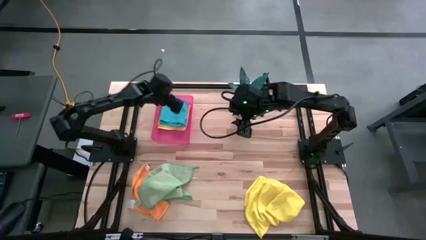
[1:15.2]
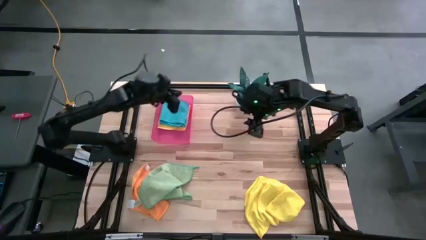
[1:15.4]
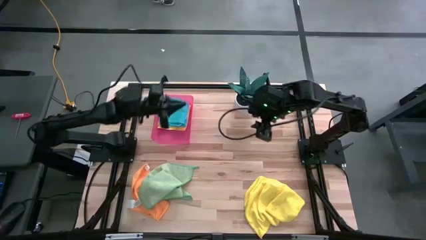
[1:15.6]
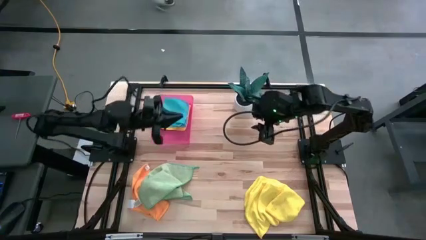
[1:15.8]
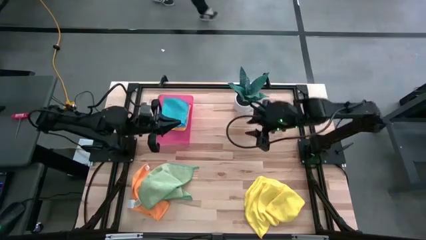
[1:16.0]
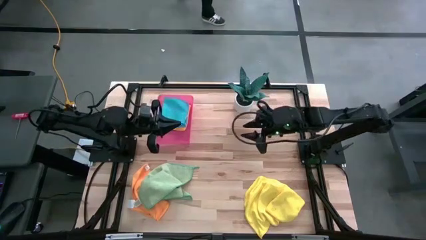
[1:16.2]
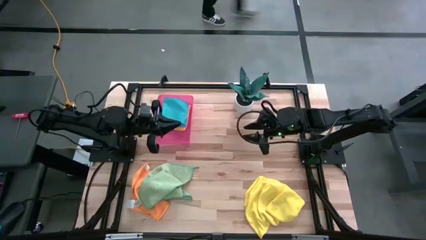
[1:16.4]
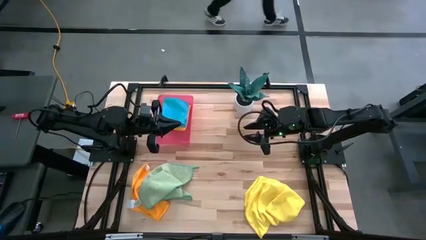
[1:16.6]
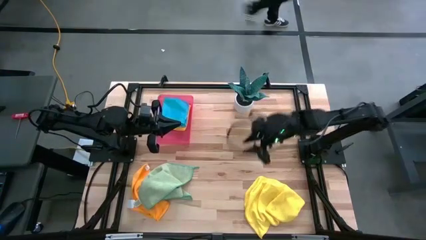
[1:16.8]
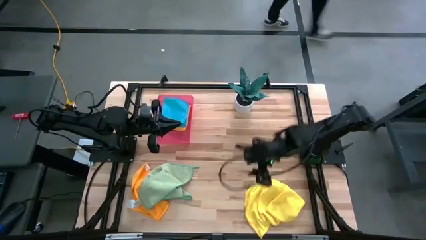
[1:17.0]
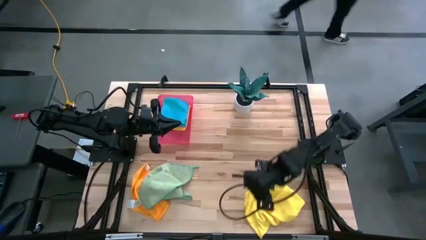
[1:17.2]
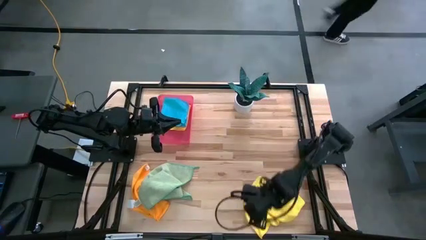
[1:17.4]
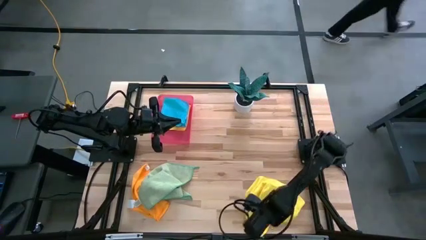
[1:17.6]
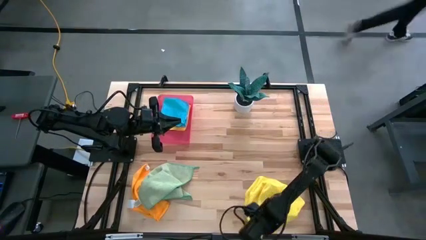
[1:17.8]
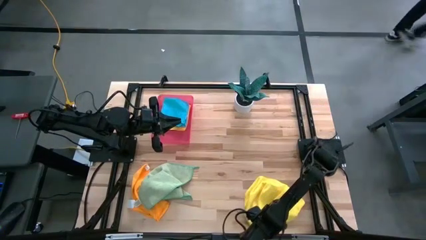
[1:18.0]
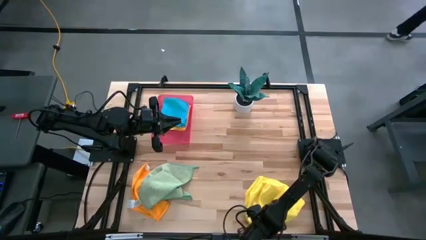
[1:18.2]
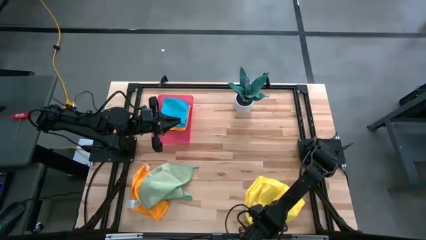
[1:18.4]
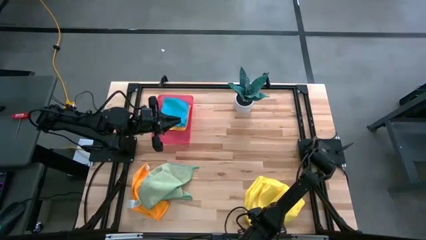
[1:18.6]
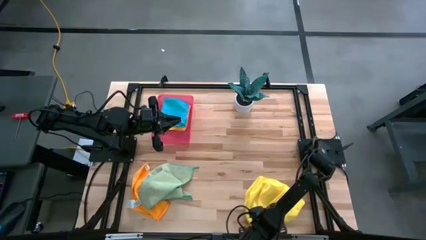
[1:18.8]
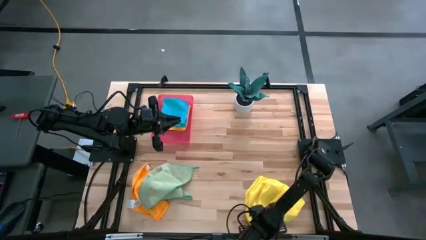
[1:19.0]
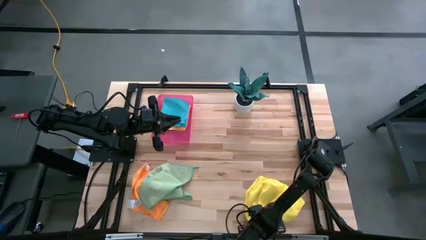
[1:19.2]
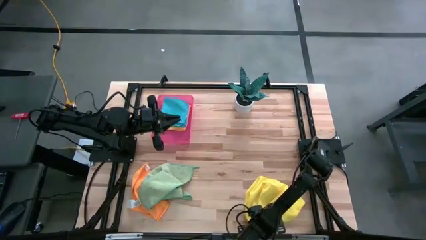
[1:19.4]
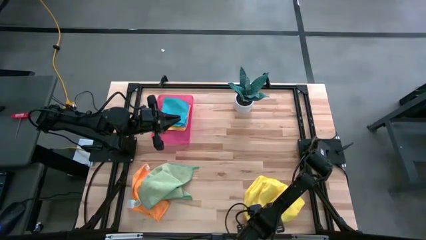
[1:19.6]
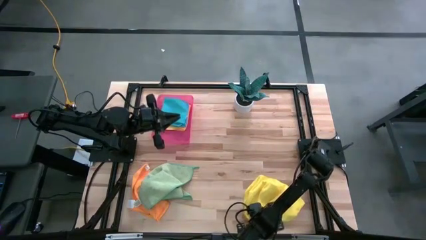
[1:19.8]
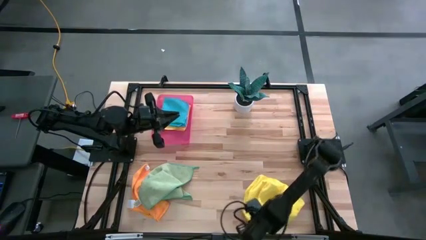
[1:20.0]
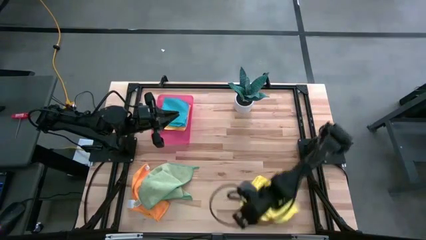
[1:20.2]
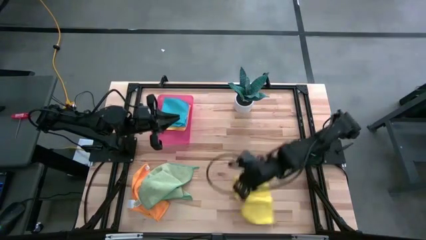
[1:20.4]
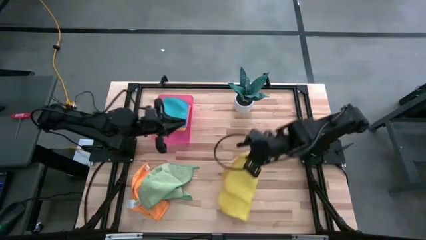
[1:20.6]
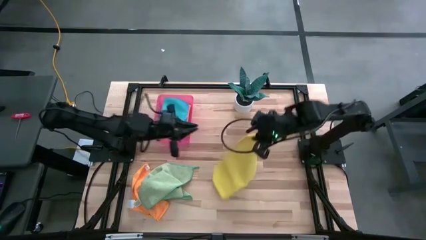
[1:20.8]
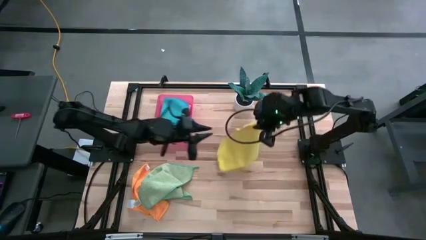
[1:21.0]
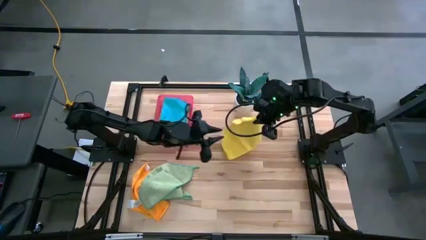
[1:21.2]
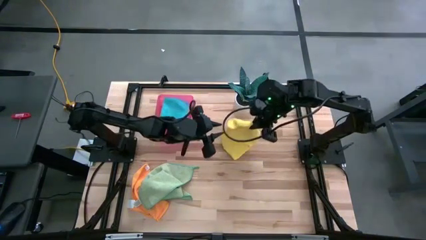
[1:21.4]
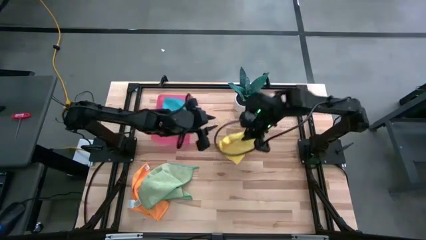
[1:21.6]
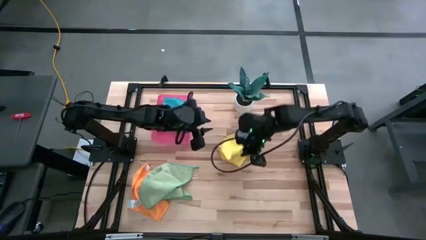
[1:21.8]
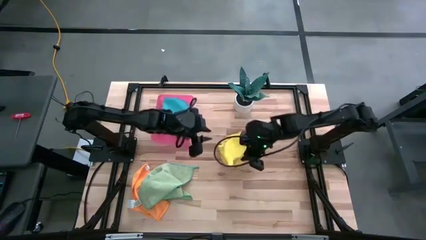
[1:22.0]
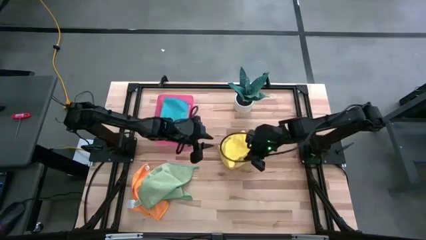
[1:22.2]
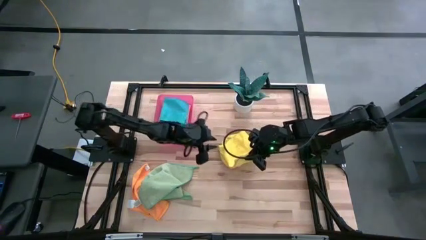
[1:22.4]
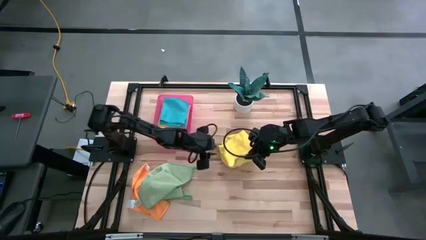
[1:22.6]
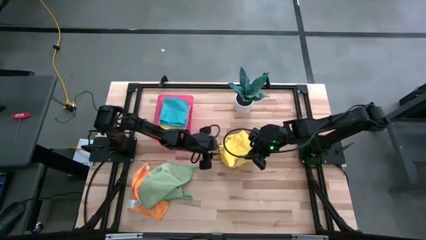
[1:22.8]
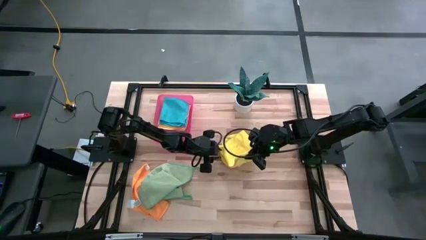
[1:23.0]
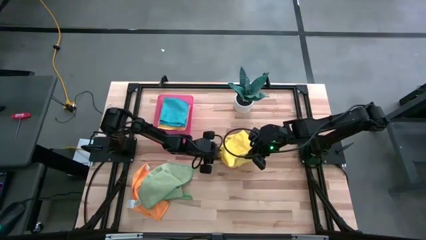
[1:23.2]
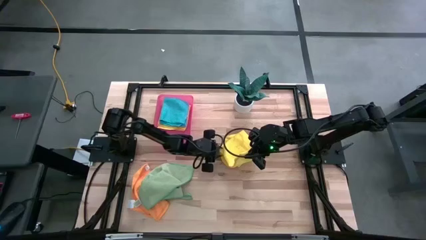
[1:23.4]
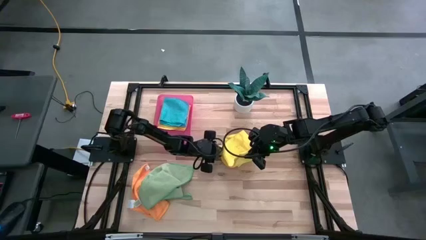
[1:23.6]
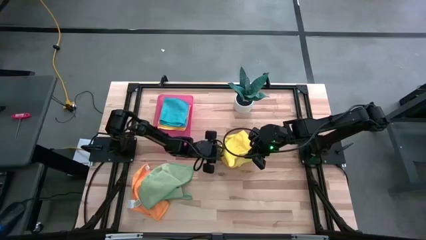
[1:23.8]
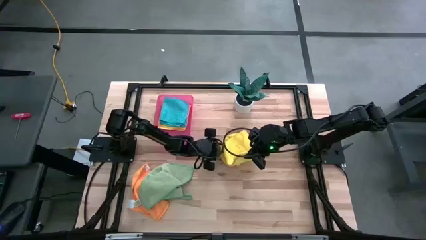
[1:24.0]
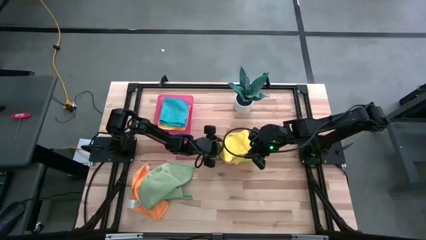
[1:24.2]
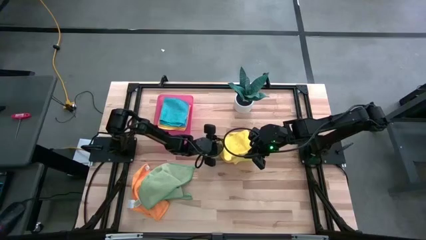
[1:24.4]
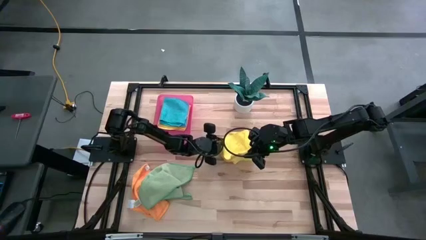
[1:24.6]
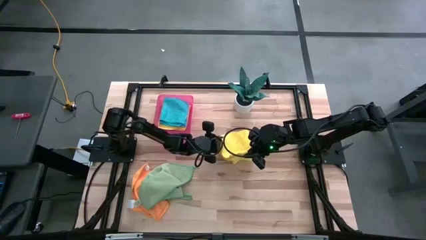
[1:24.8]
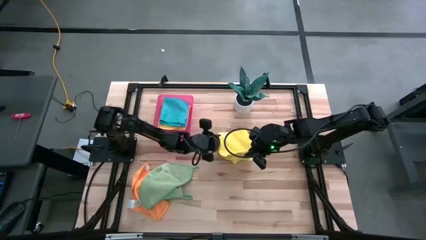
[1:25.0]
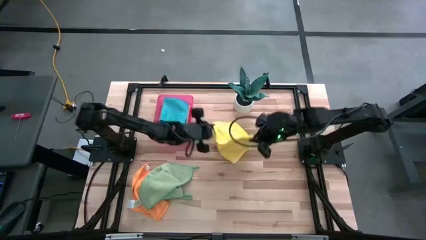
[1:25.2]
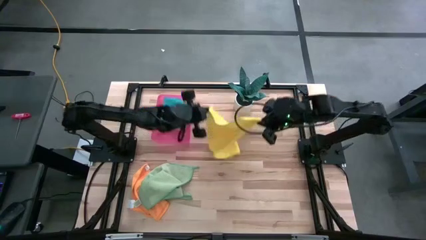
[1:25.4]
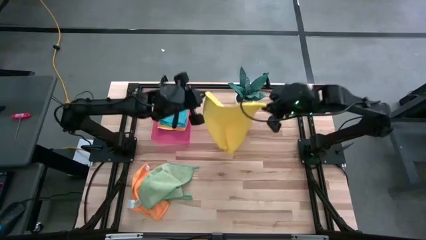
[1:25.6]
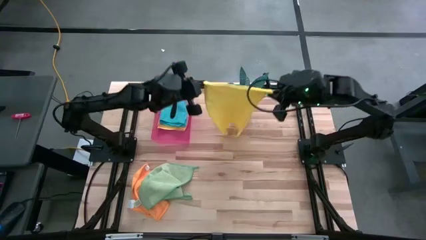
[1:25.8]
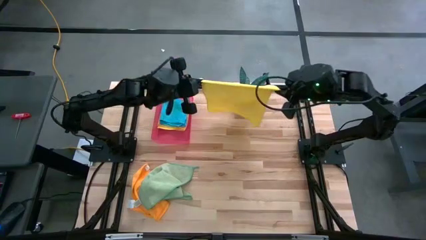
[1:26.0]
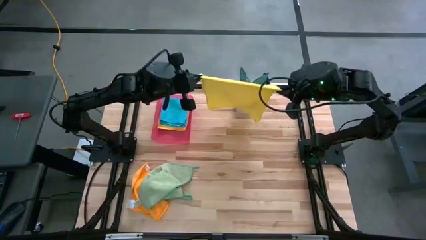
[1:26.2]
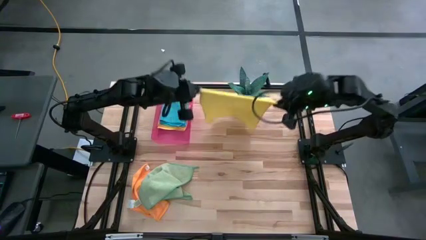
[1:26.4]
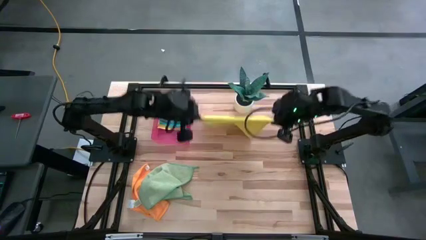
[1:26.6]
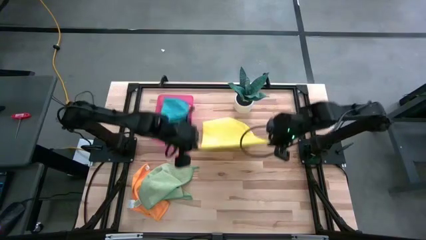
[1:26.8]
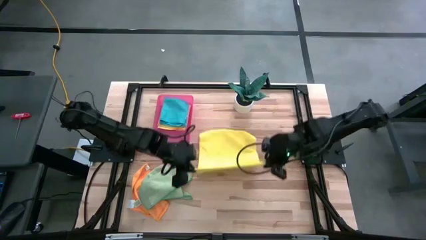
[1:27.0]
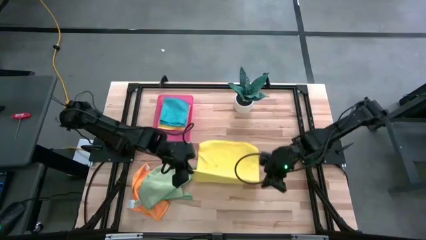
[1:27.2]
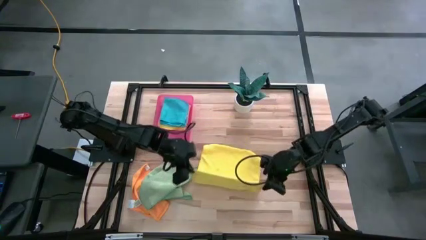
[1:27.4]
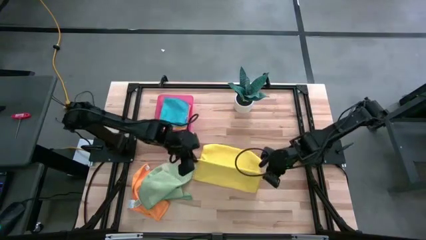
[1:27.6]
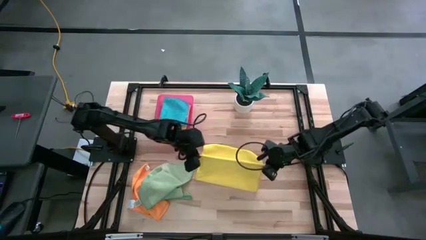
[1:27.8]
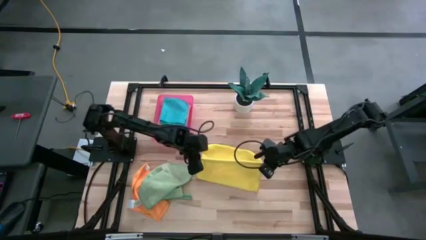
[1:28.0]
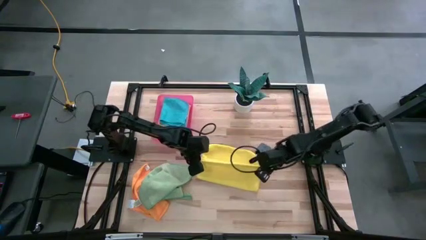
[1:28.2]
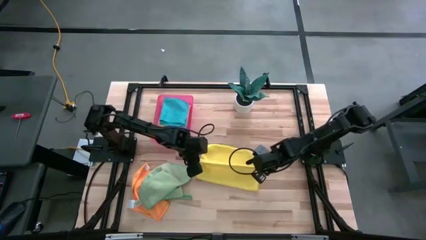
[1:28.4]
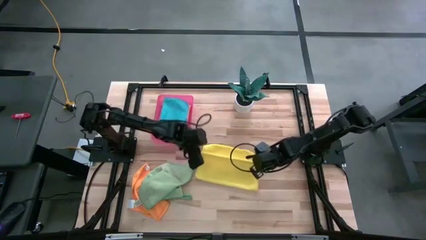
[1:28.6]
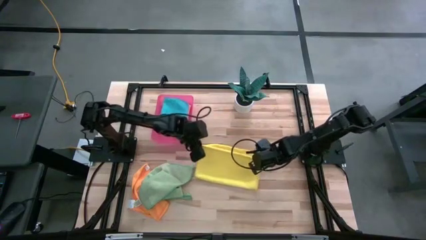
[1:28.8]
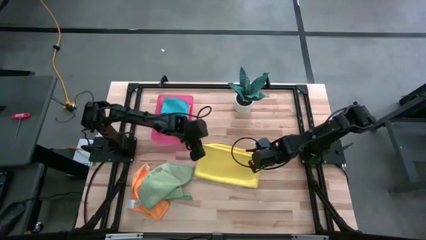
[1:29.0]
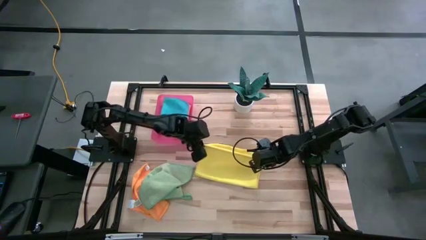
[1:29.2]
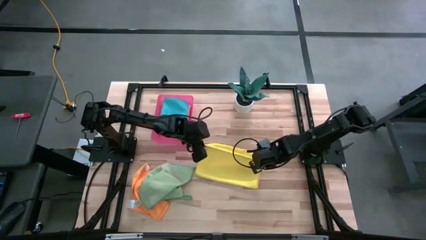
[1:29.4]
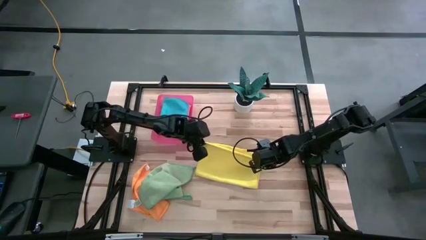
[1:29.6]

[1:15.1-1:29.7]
Task: Fold microfiber towels
Fold the yellow microfiber towel

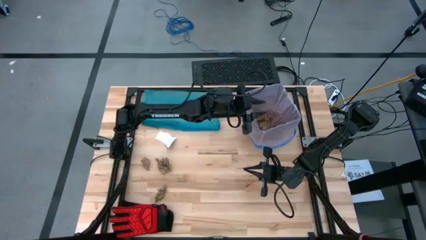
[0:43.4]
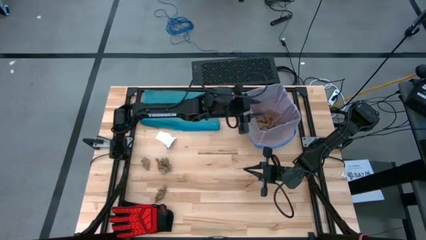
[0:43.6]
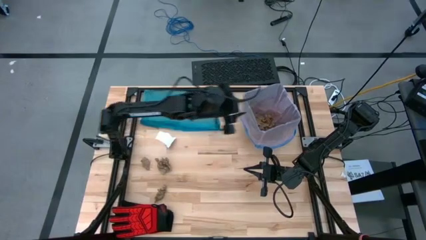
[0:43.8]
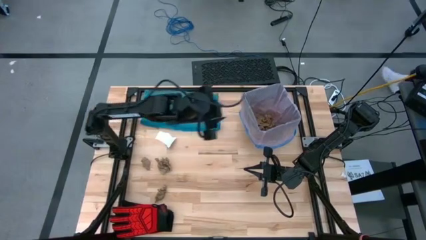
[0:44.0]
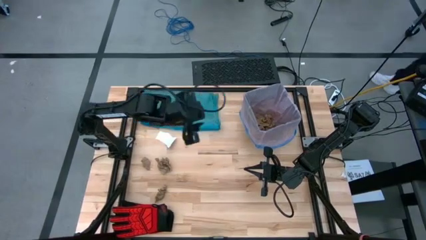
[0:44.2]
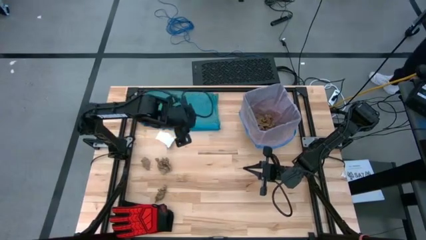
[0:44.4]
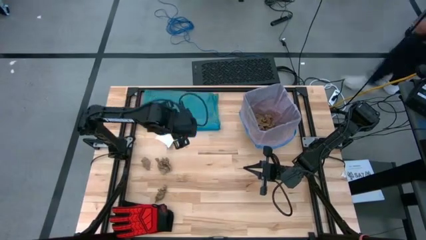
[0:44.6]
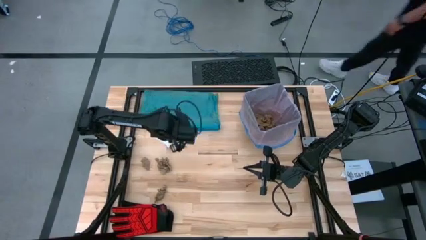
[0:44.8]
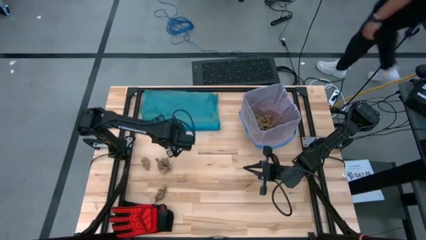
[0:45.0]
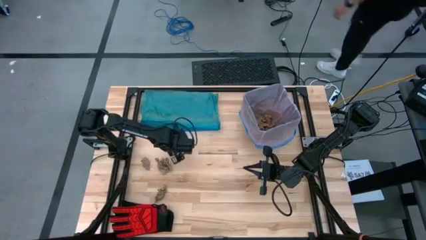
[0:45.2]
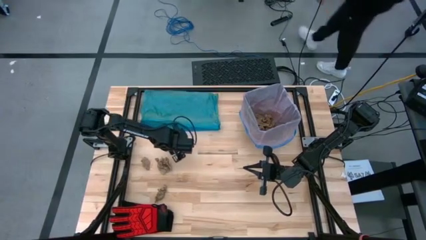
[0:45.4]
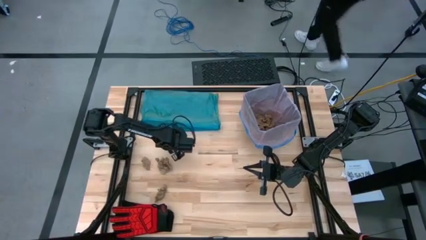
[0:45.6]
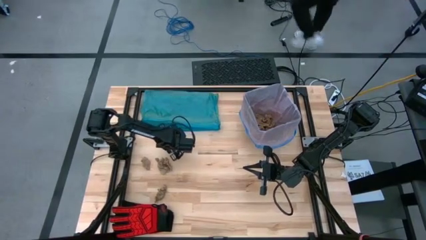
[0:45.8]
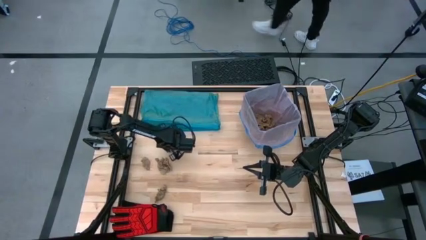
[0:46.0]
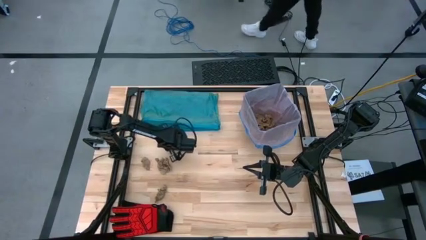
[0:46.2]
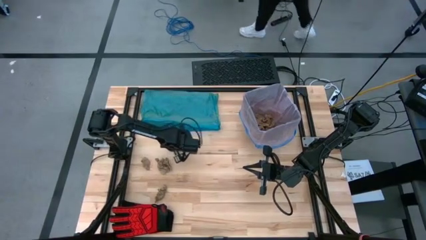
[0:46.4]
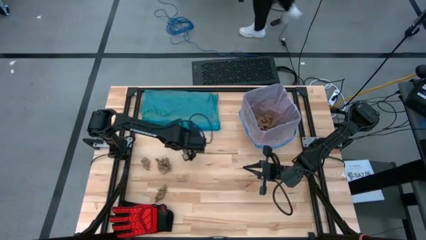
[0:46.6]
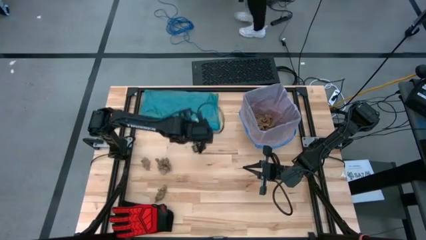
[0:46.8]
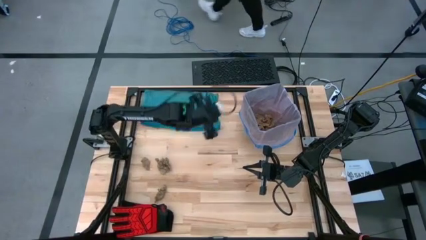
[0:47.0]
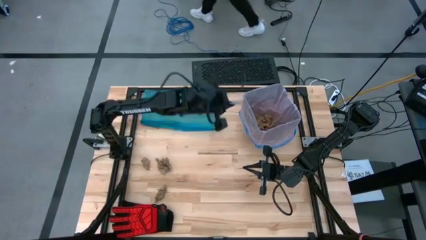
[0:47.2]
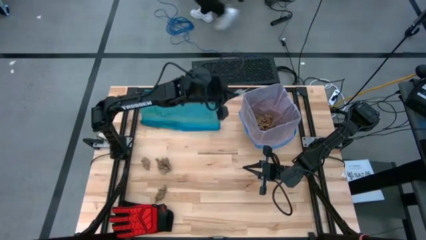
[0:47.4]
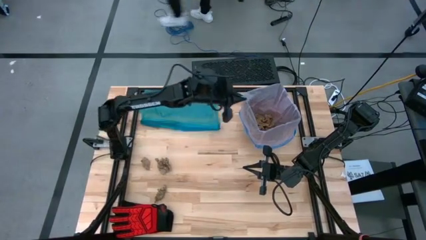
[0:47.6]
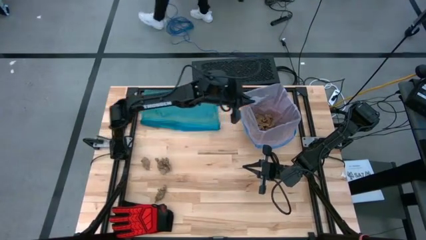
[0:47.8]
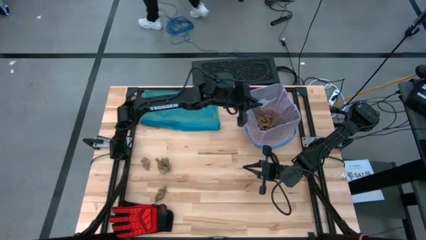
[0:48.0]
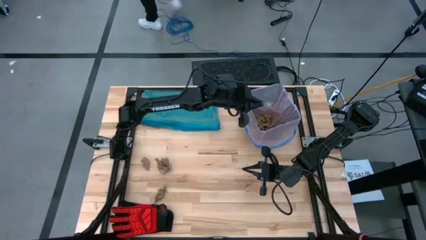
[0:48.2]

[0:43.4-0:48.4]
Task: place trash/remove bag and relplace
Put the white paper into the trash bin
